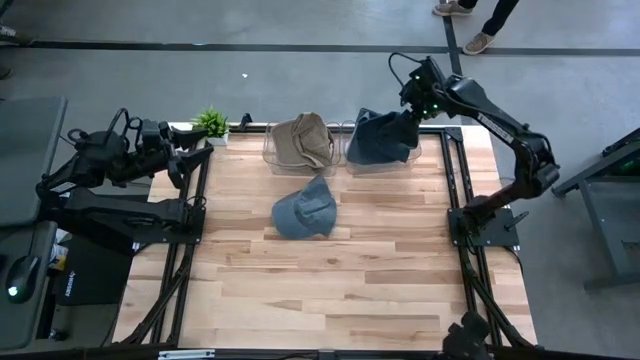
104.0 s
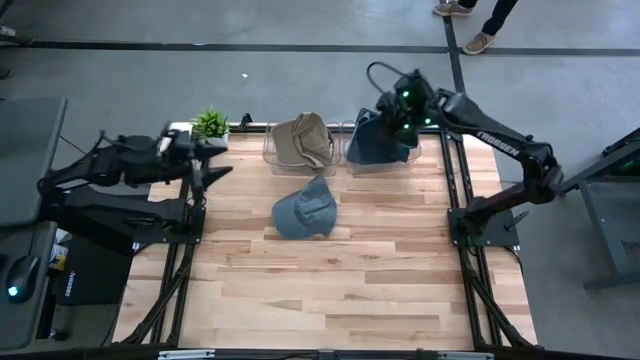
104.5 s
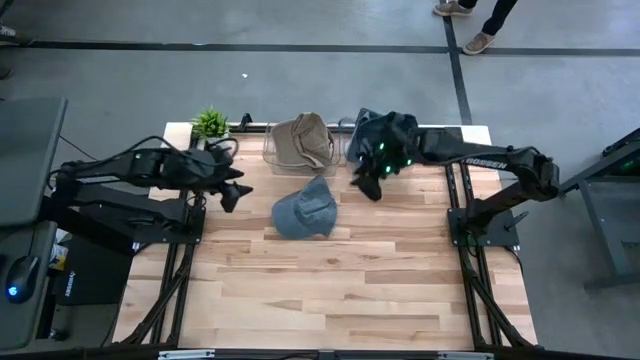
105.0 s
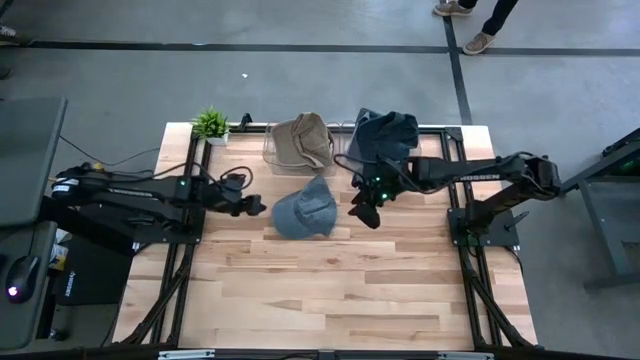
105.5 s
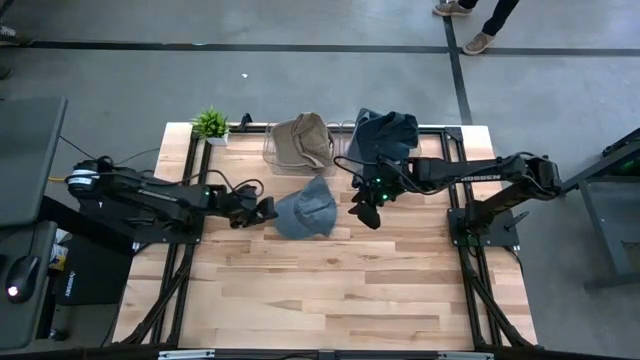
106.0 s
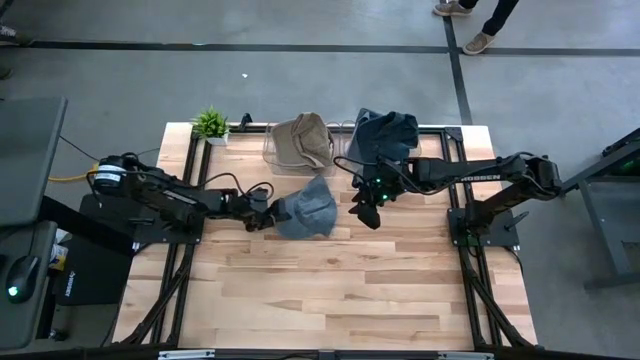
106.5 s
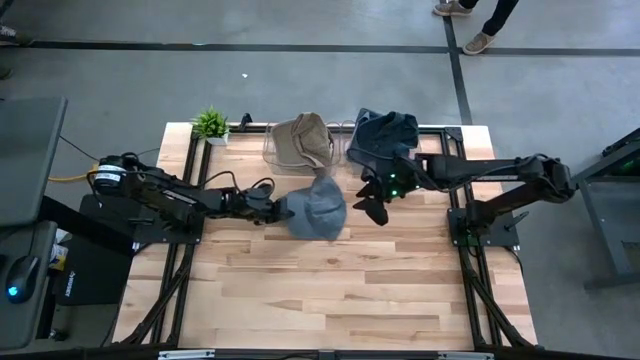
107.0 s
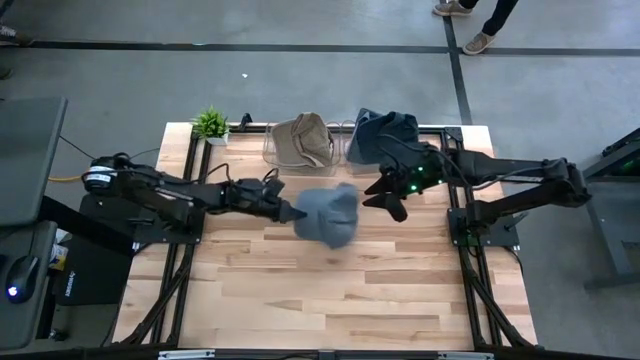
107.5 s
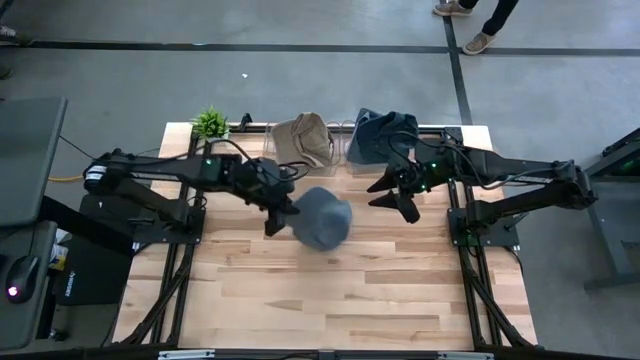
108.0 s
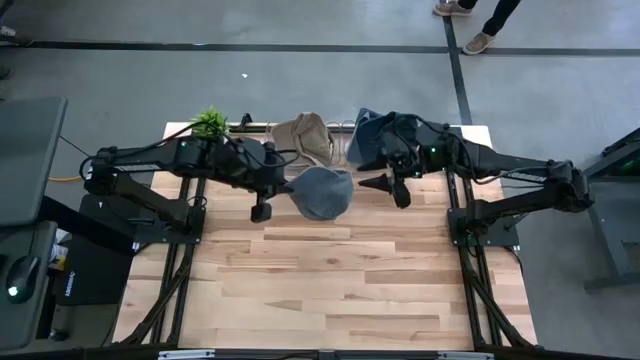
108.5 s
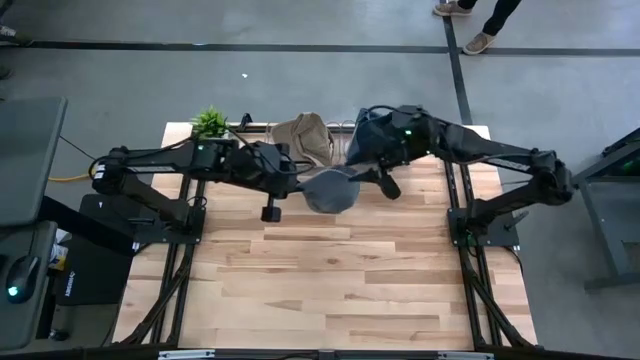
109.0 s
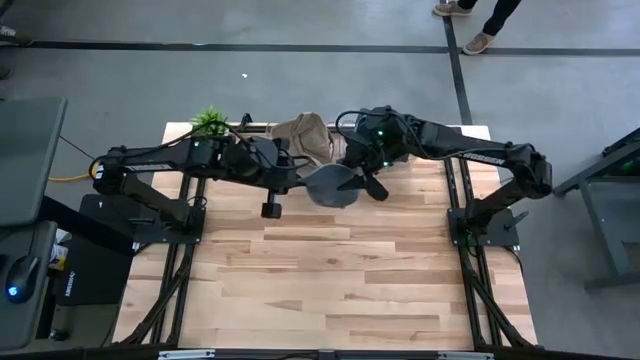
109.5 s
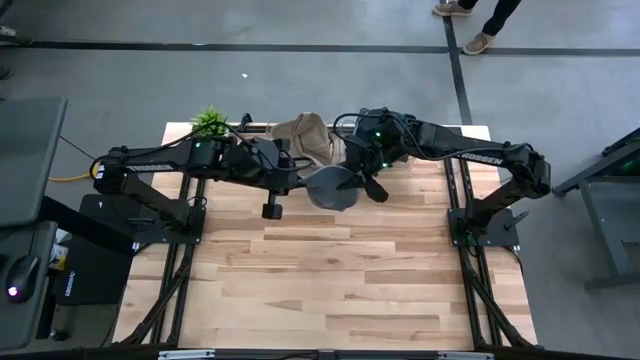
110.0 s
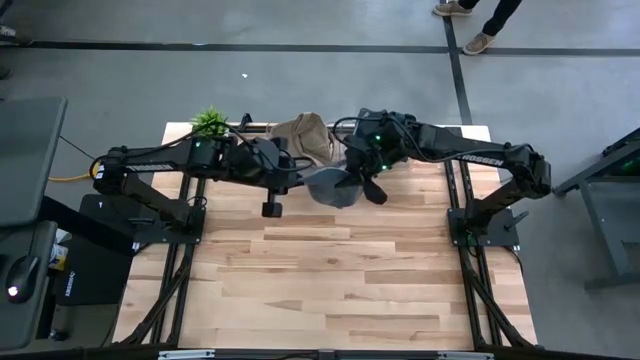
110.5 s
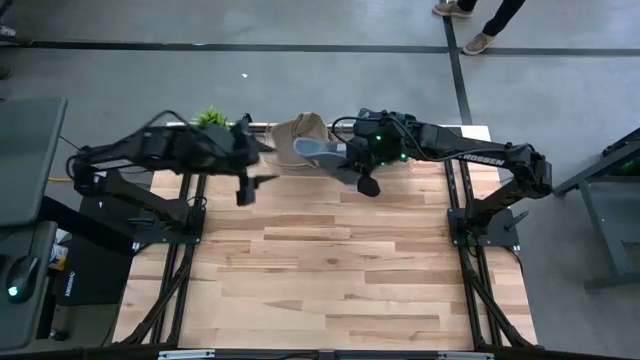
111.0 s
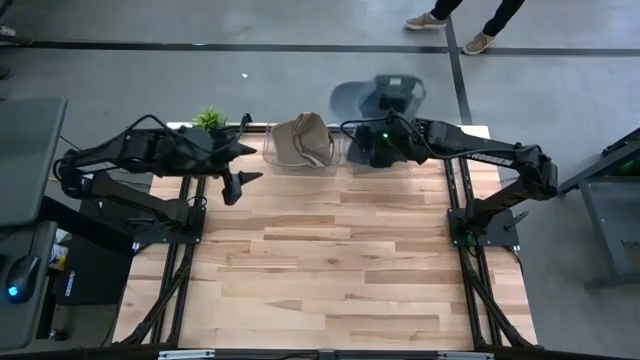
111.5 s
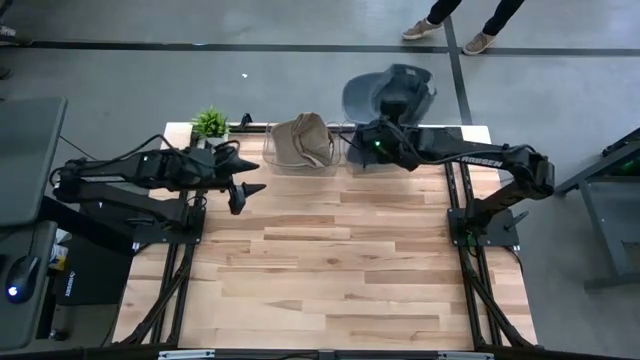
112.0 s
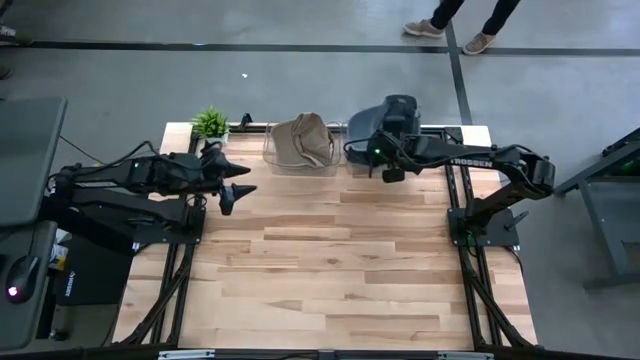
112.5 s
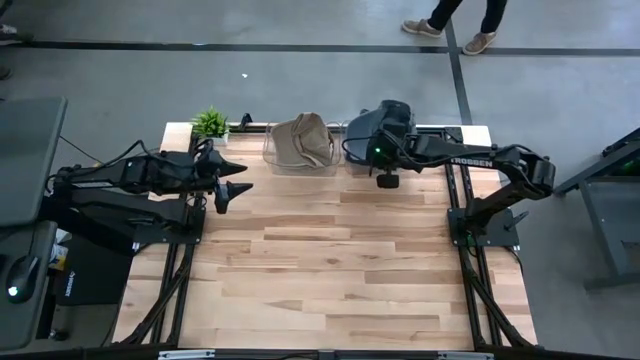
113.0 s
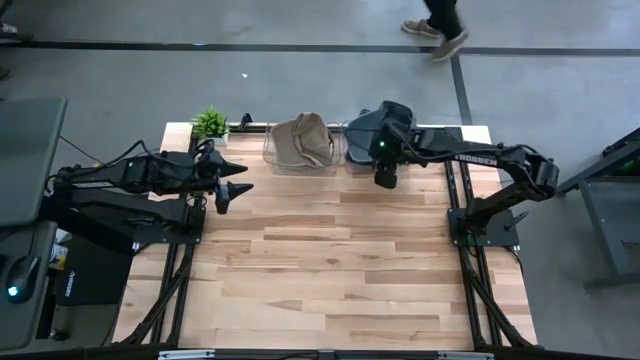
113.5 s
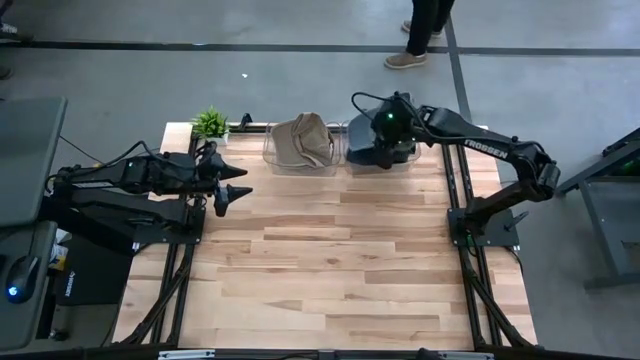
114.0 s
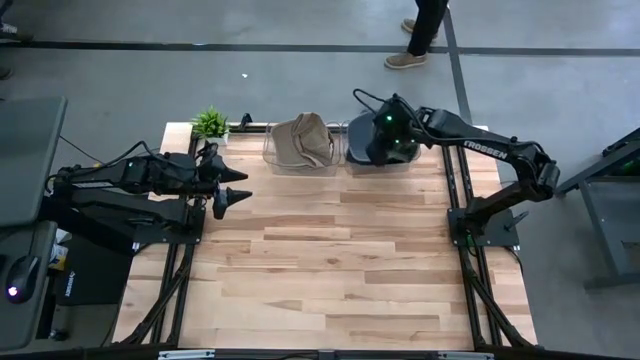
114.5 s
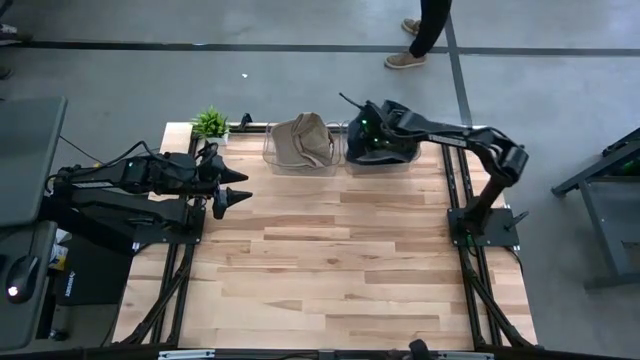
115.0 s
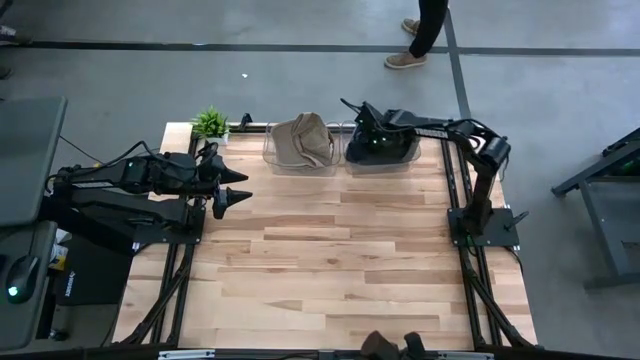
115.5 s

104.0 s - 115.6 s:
Task: Pick & Place hat
Put the gray cap into the right transparent bin

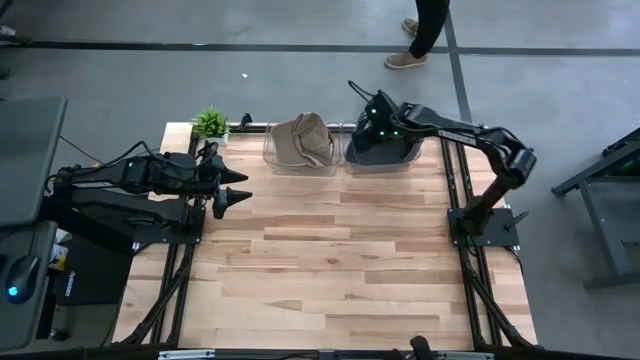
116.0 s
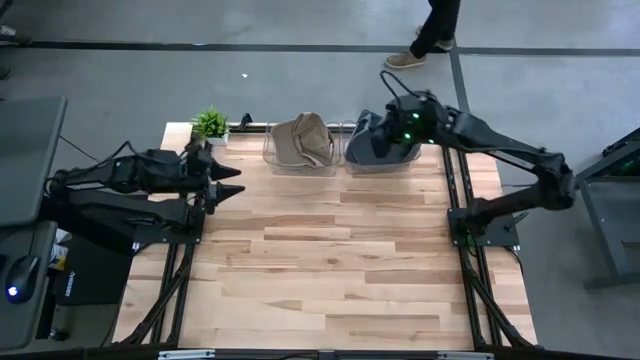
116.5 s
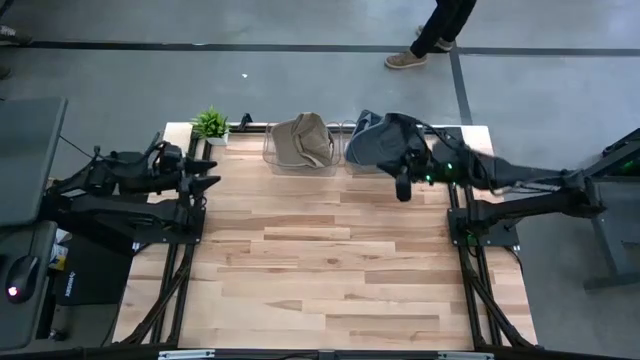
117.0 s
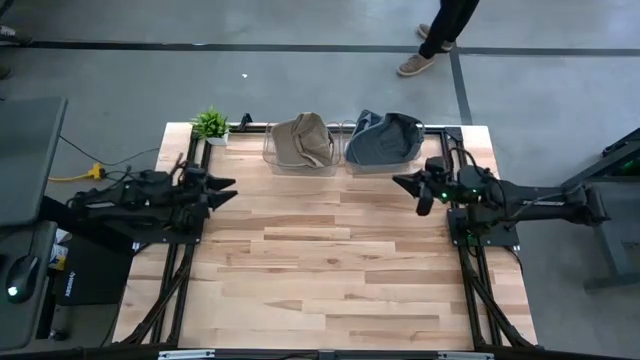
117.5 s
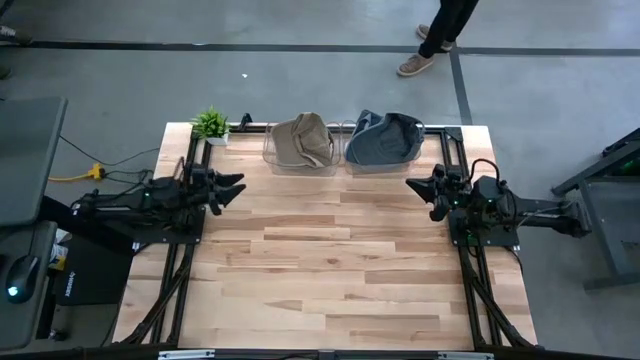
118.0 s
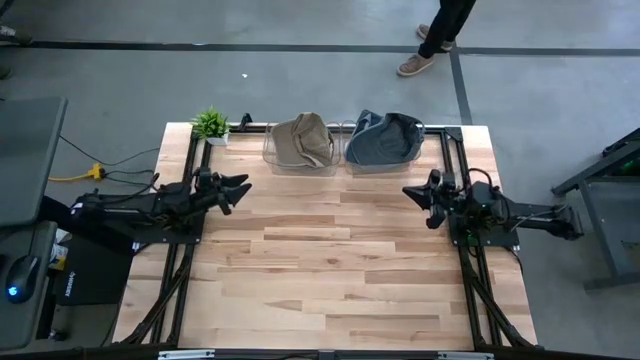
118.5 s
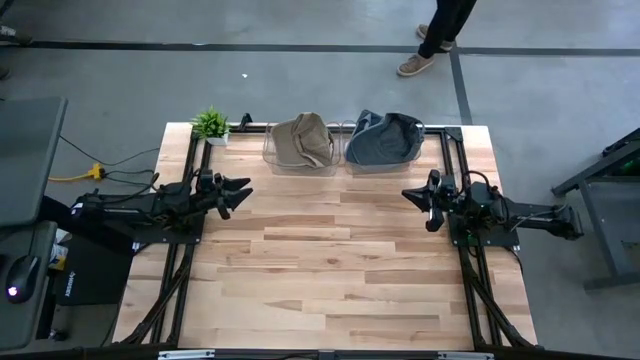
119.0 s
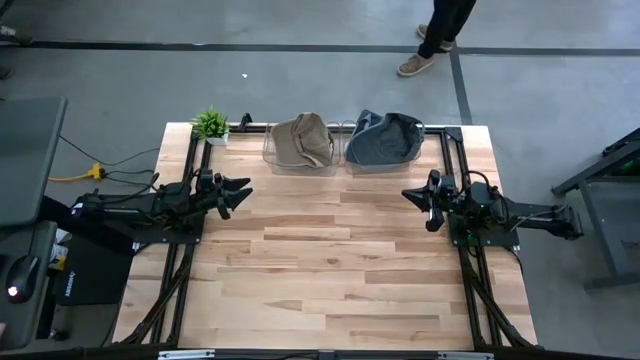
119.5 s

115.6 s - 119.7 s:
Return to Home Position

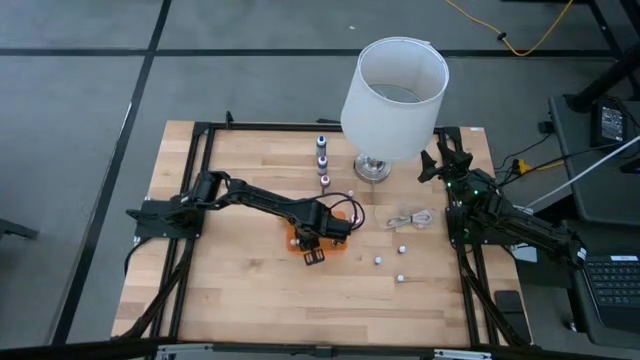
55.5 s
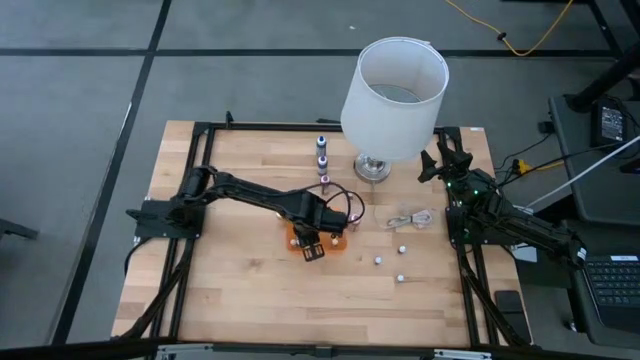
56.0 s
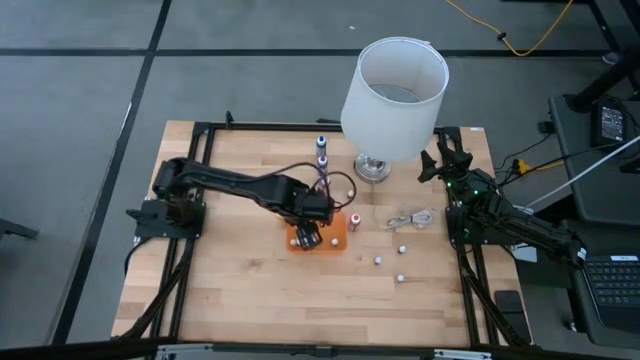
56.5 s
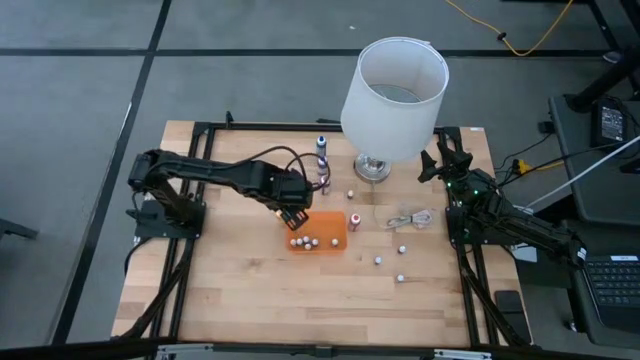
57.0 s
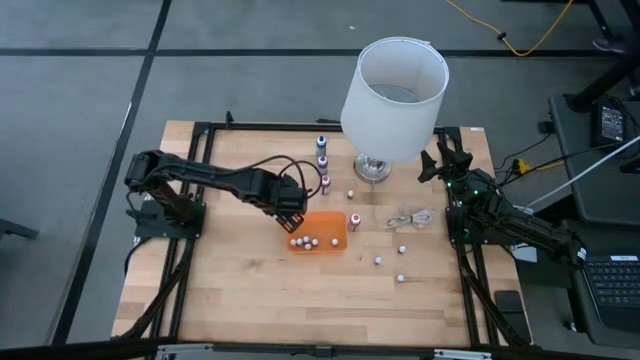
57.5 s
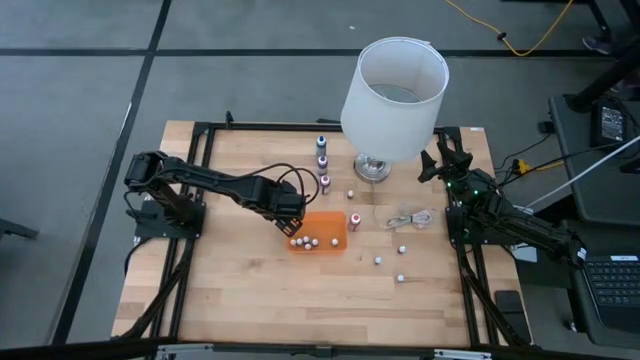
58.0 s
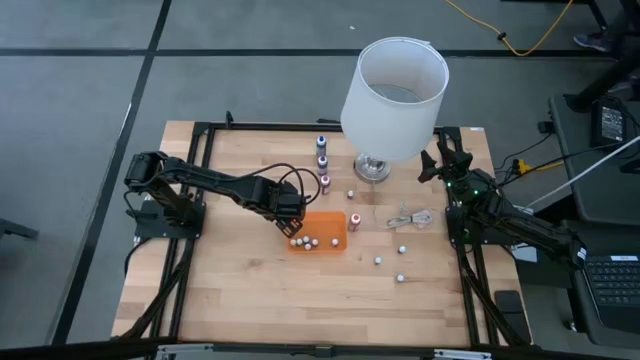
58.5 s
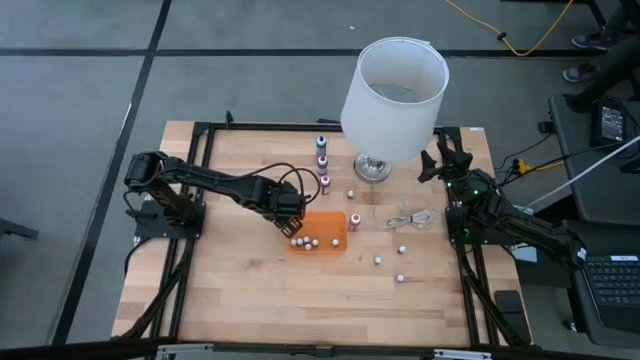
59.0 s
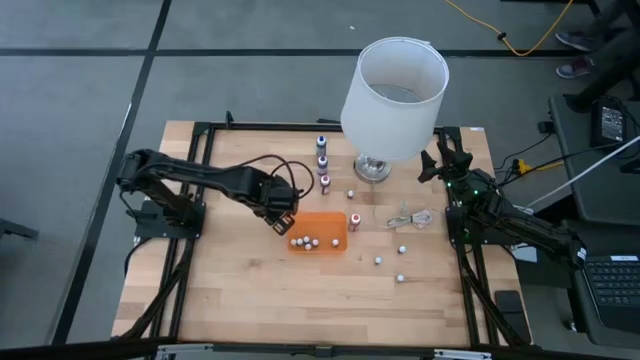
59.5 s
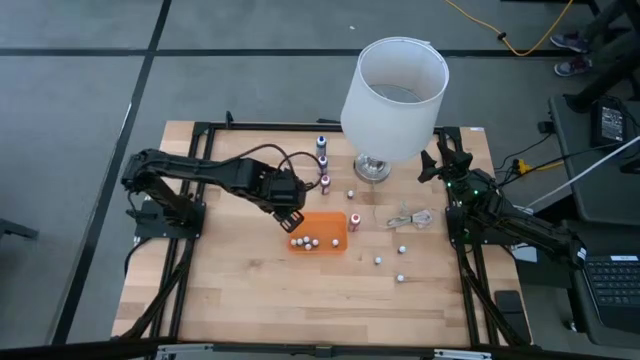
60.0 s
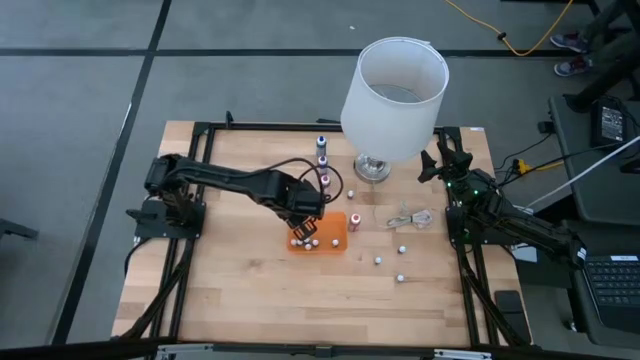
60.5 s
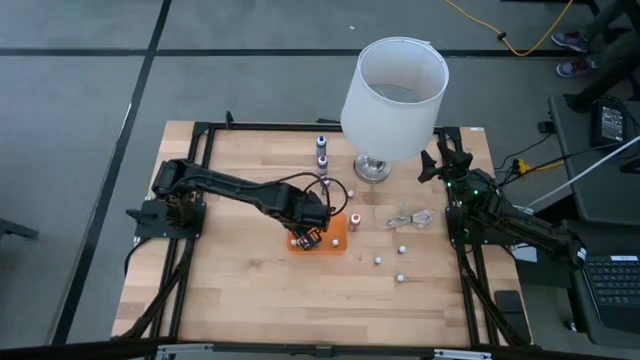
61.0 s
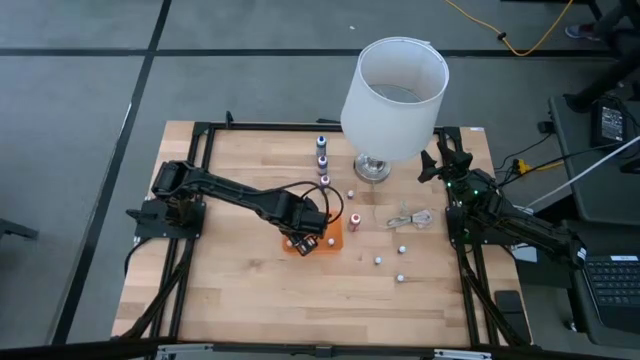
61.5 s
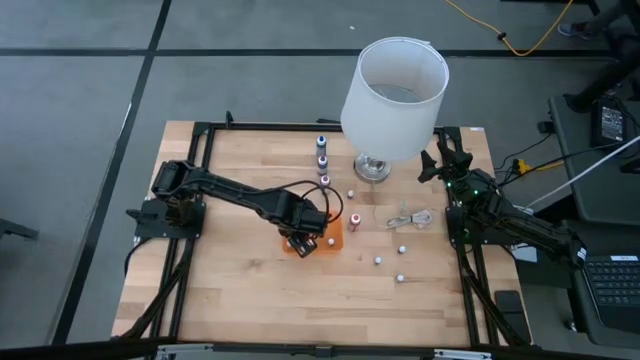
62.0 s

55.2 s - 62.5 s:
Task: Pick & Place food coloring
Put the big yellow food coloring bottle into the orange transparent bin
